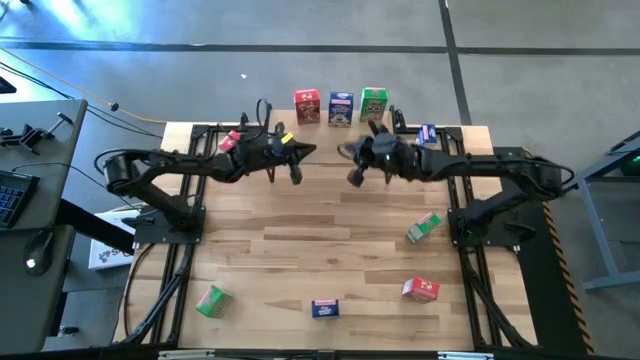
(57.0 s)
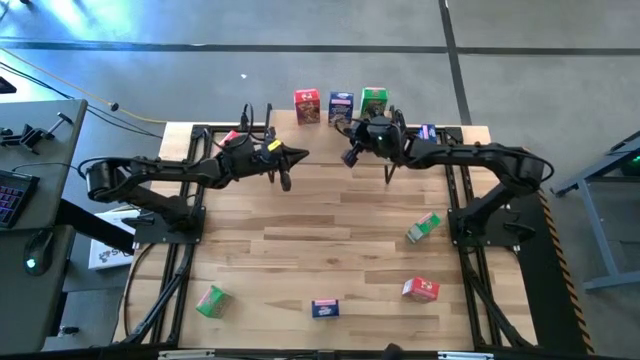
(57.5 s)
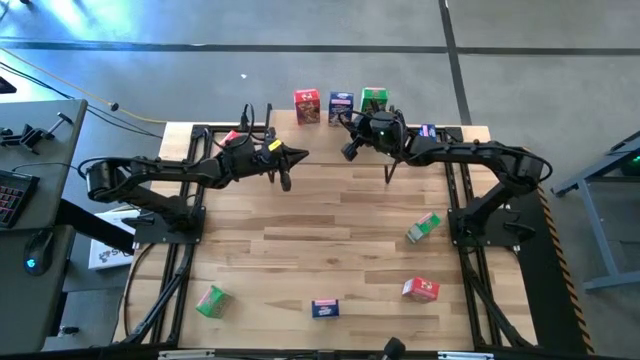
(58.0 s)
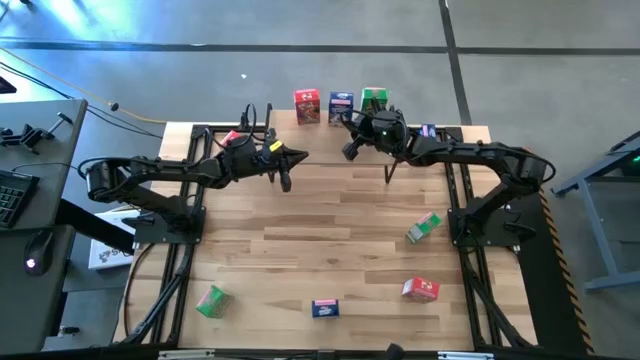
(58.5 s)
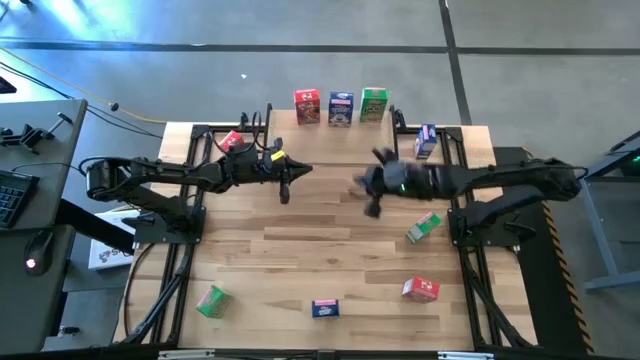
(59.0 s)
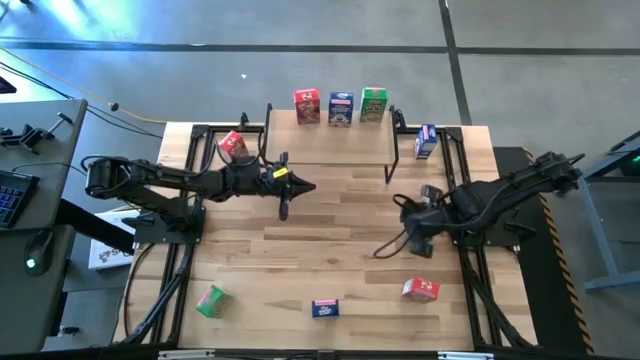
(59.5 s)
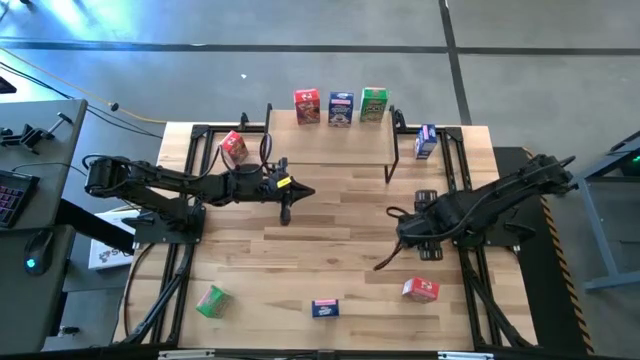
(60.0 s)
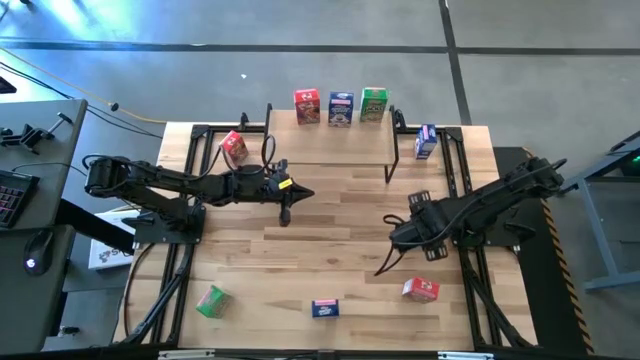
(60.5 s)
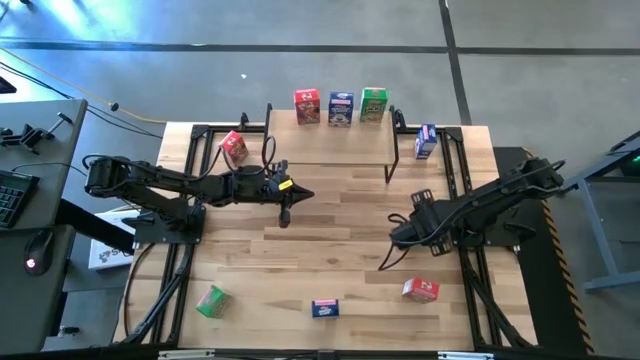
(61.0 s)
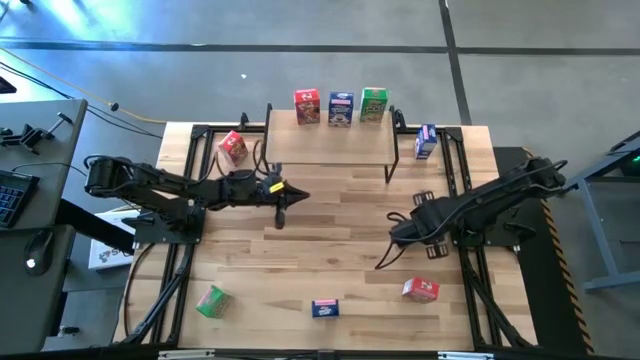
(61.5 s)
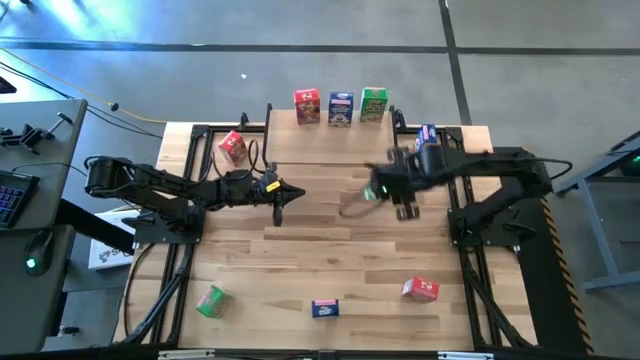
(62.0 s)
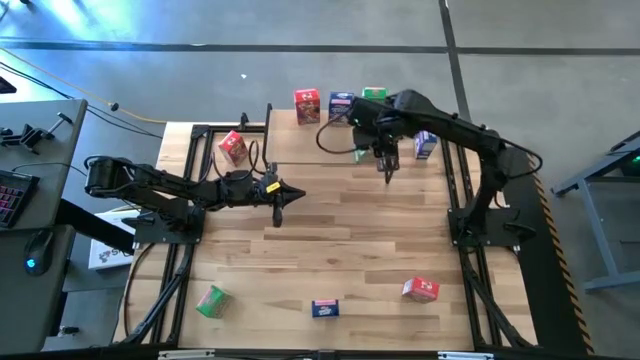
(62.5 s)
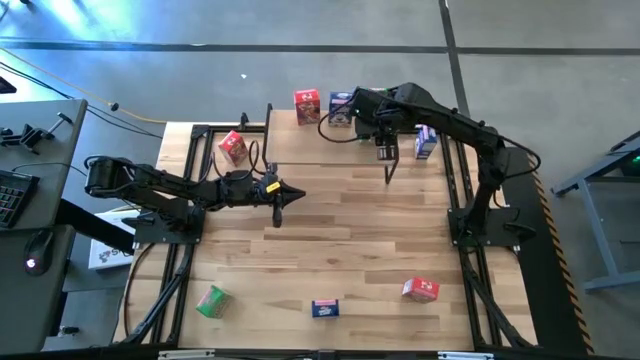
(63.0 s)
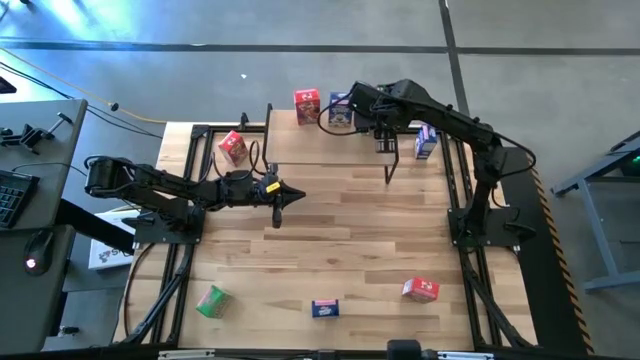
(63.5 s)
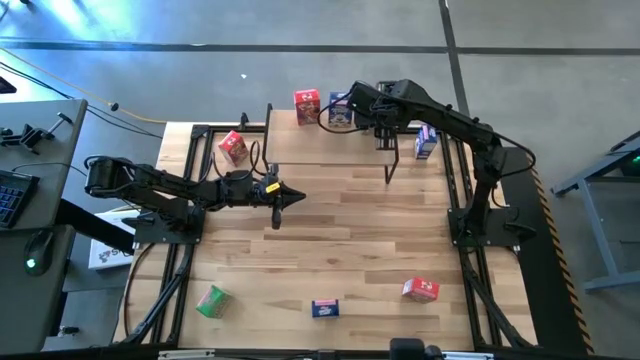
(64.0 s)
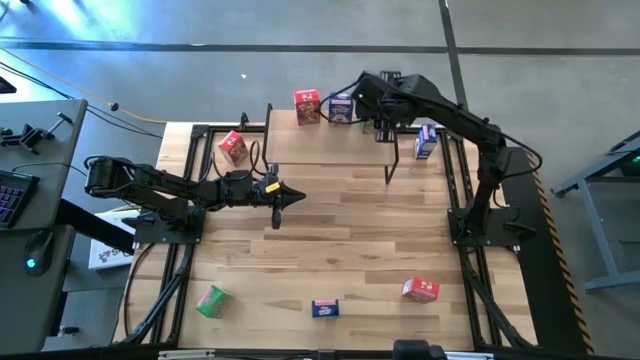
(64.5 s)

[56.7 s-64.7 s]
Task: Stack cereal on shelf
Put the right green cereal box on the shelf in front of the other green cereal box

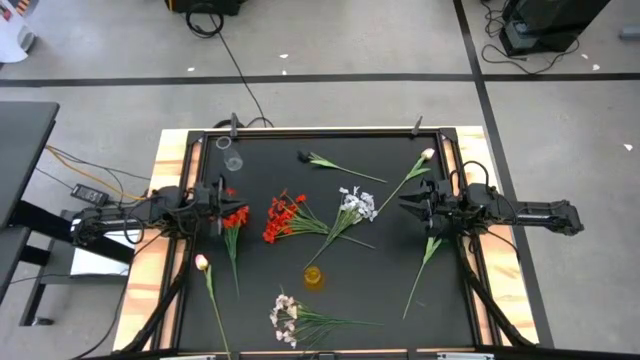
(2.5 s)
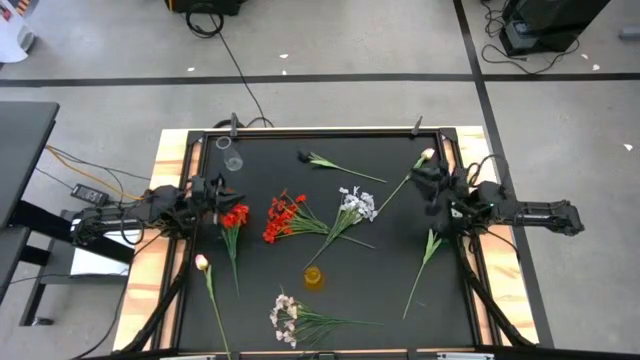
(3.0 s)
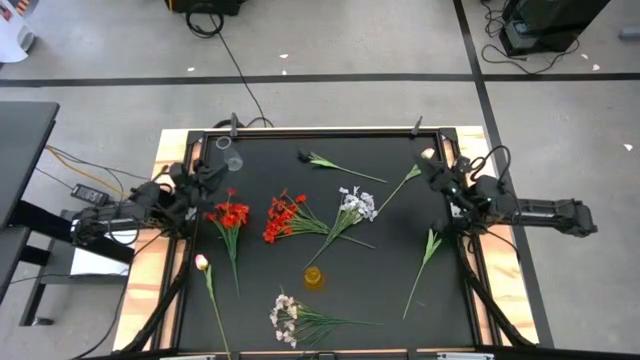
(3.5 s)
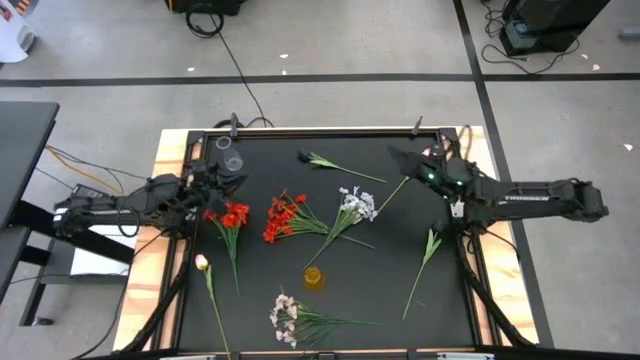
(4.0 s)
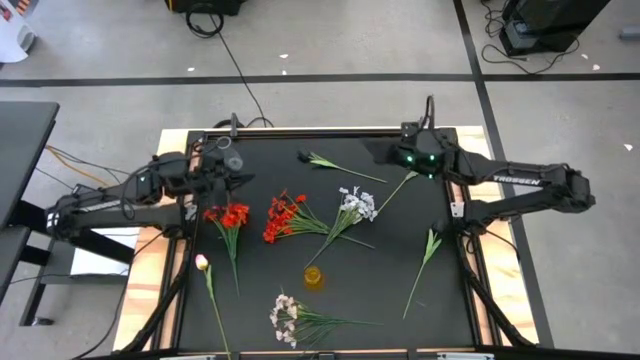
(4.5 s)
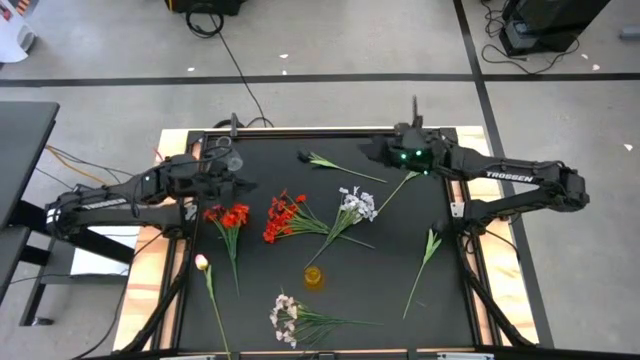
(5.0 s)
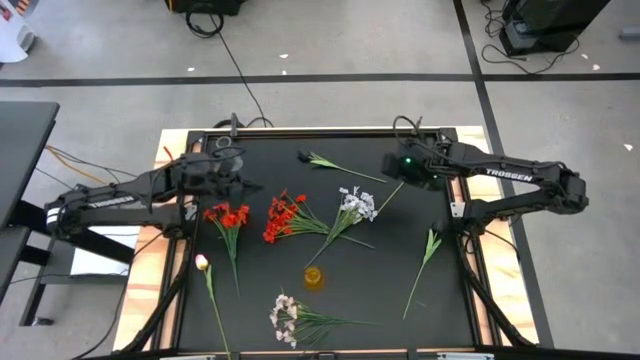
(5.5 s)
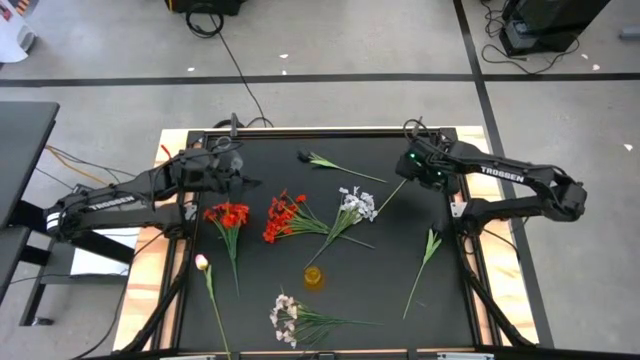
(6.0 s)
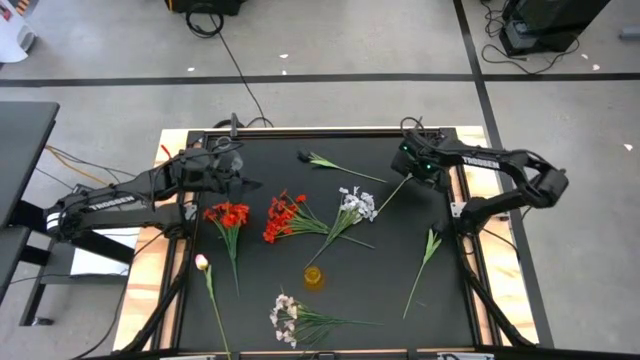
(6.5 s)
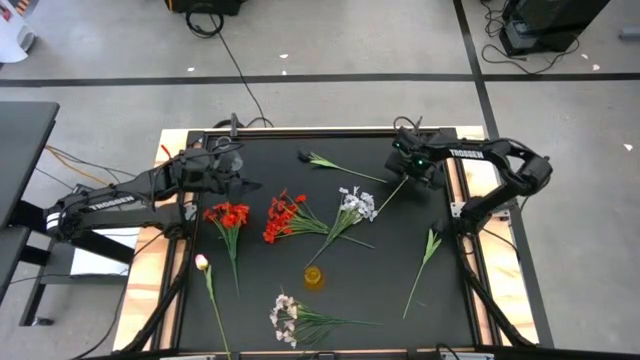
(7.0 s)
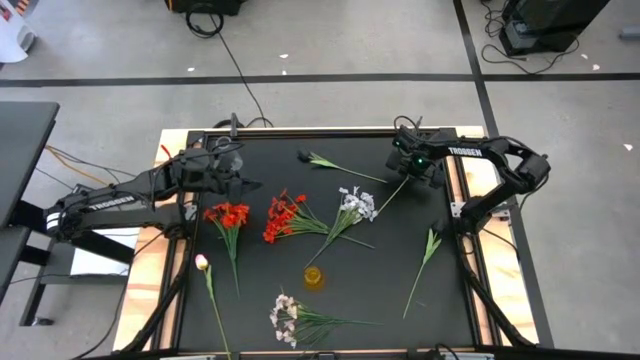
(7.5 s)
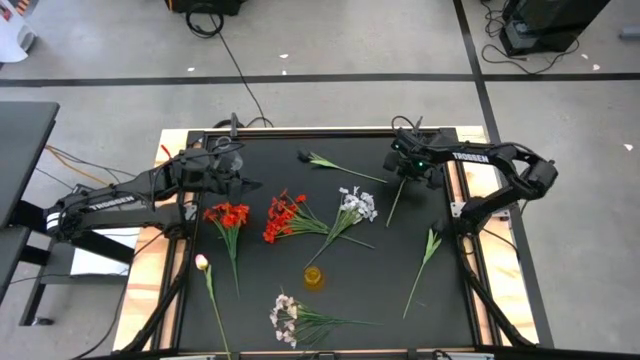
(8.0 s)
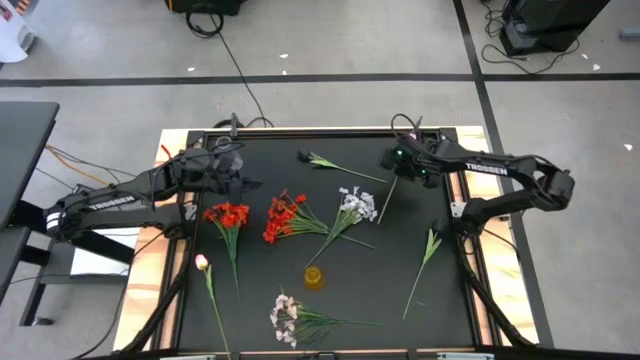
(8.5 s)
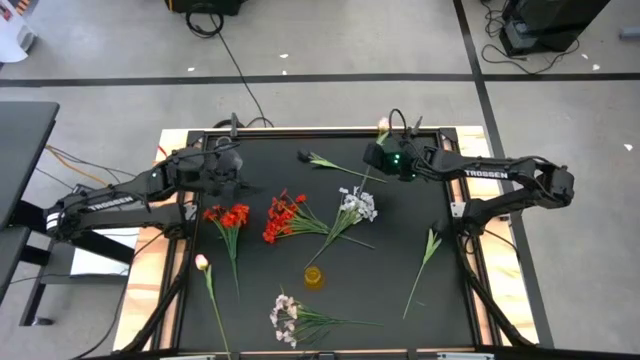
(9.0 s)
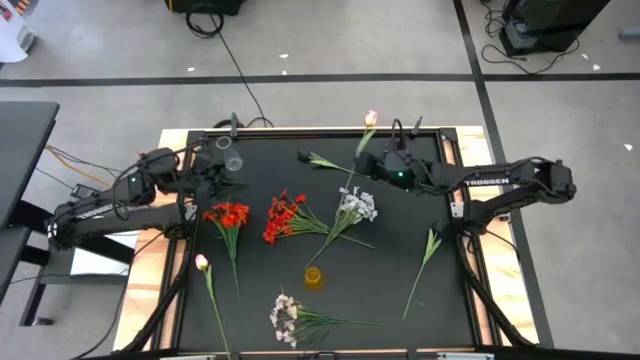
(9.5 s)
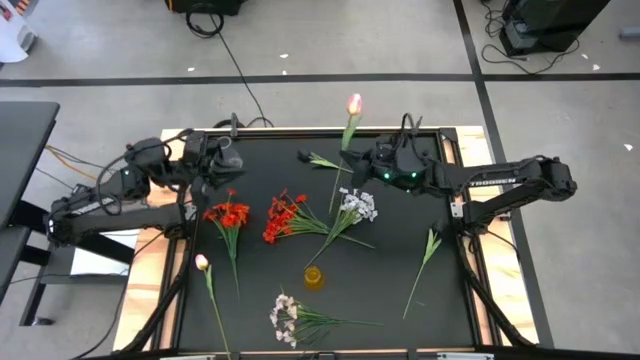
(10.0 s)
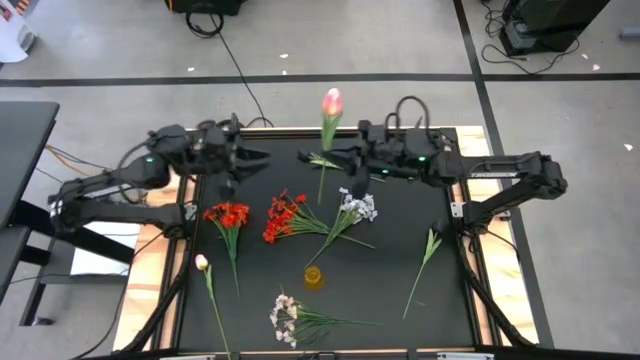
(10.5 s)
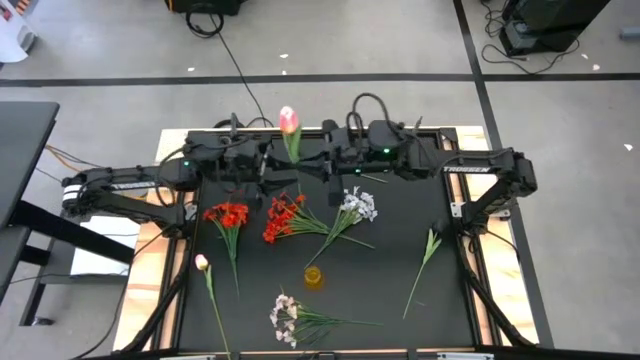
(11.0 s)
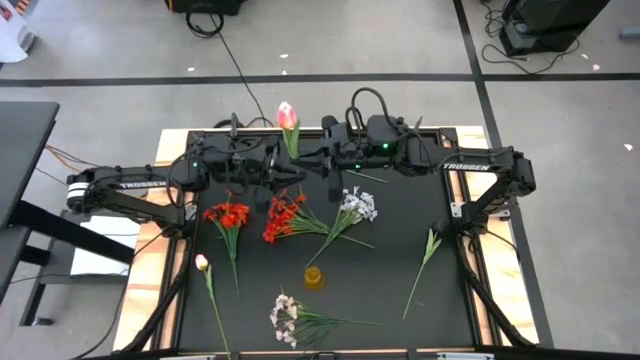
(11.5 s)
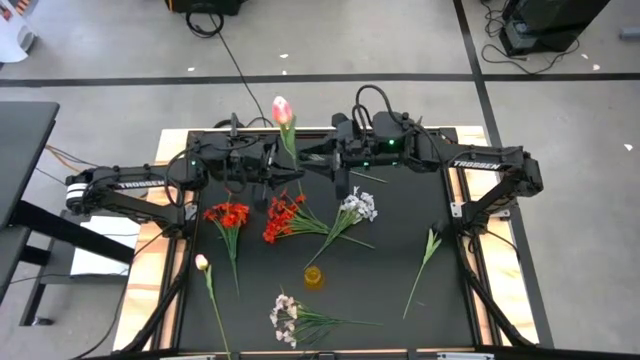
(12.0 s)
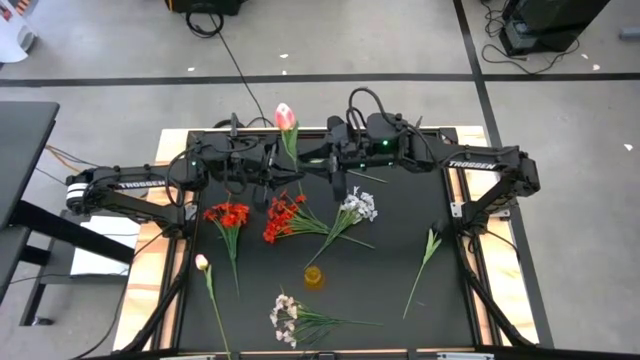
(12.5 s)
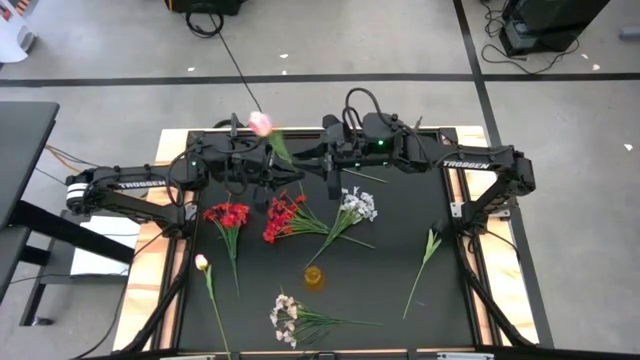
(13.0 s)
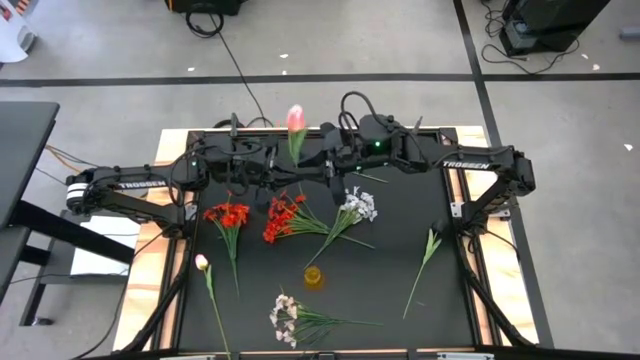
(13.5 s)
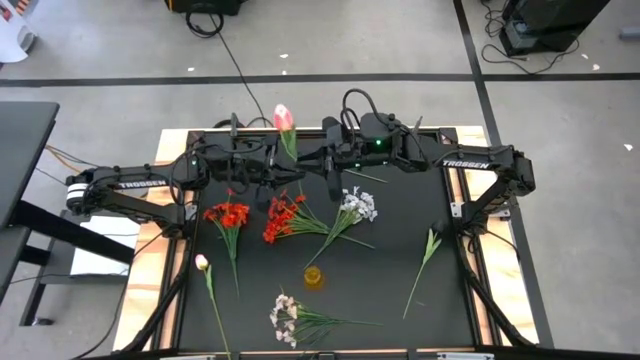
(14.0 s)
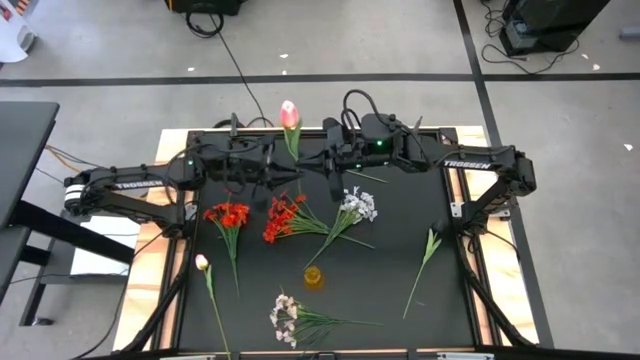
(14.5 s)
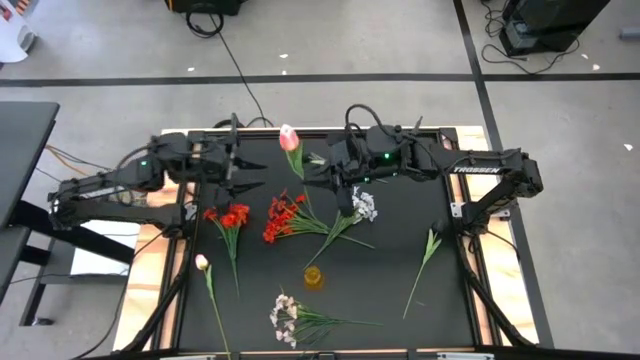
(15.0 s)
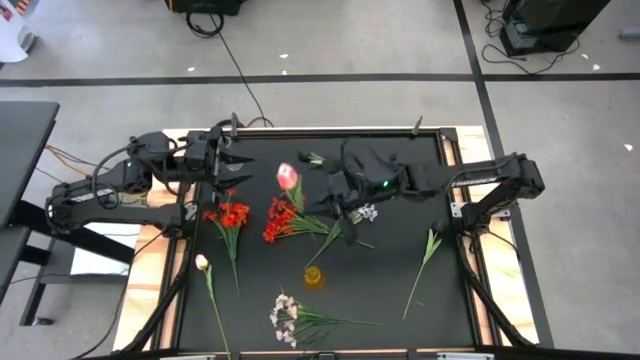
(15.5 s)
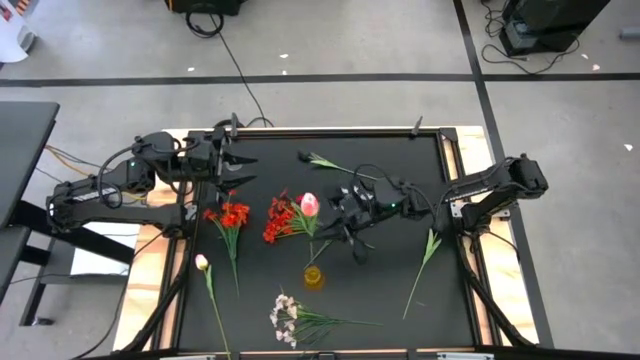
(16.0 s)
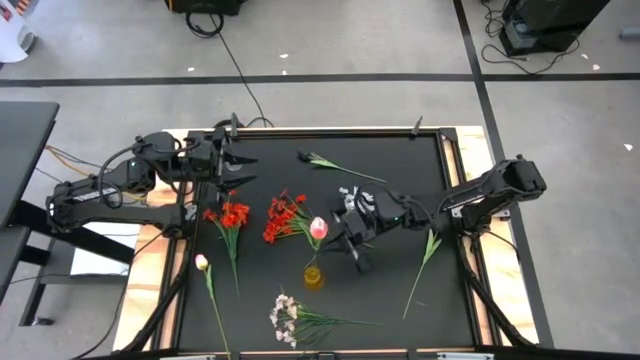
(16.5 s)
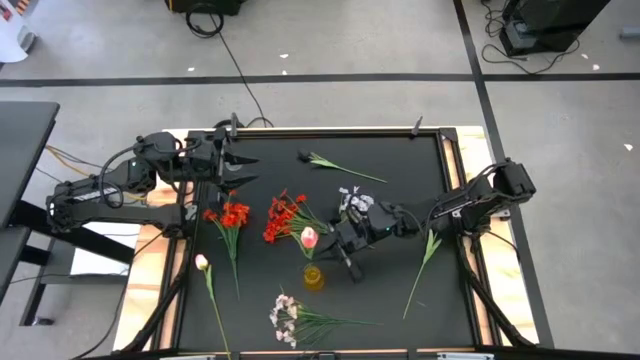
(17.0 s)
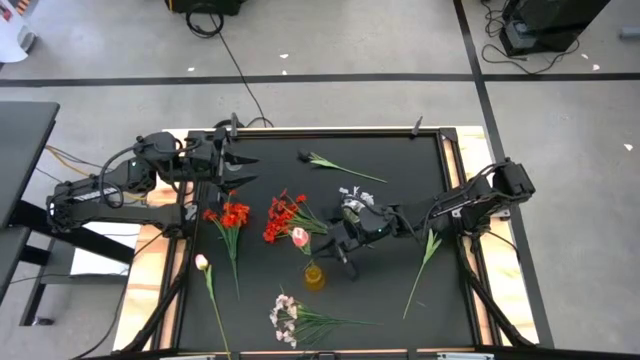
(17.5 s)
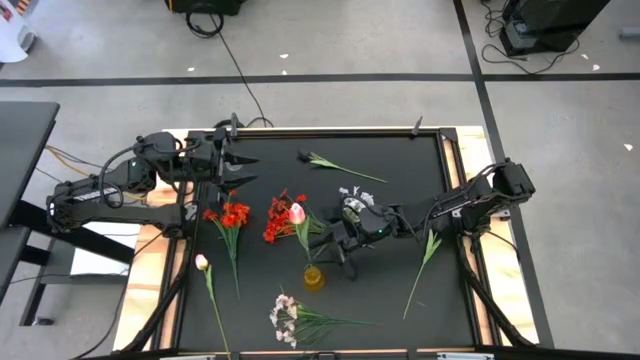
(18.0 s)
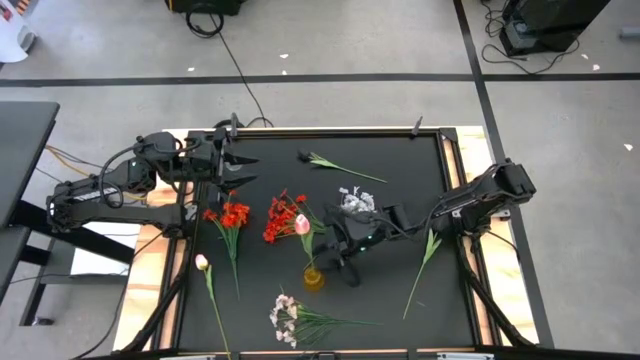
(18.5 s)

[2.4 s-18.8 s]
Task: Sort flowers into vase by color
Put the top pink flower into the yellow vase
